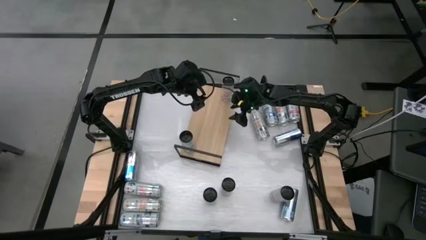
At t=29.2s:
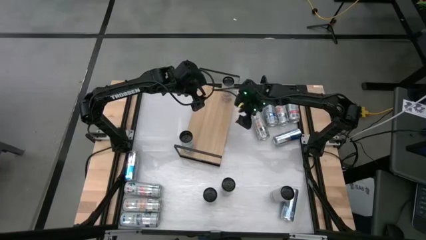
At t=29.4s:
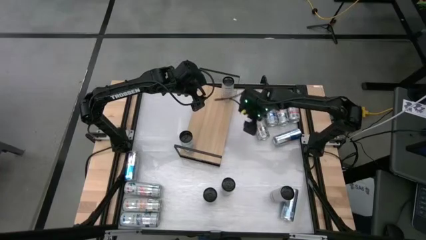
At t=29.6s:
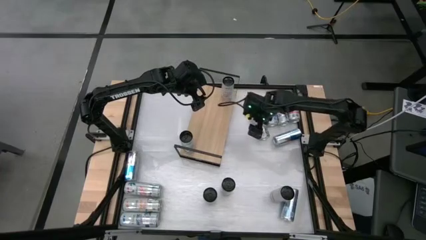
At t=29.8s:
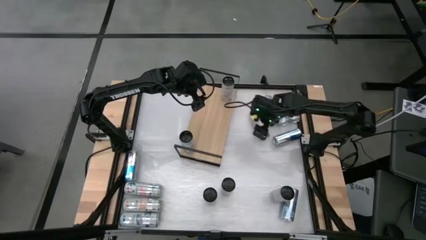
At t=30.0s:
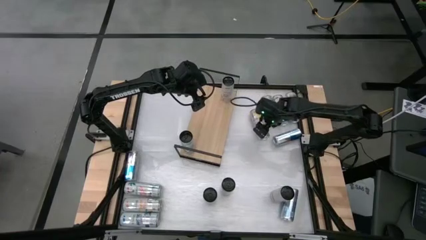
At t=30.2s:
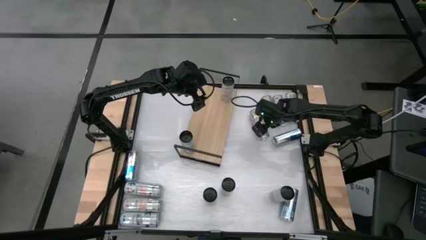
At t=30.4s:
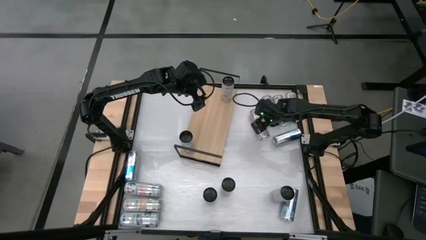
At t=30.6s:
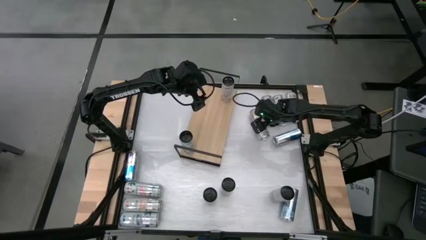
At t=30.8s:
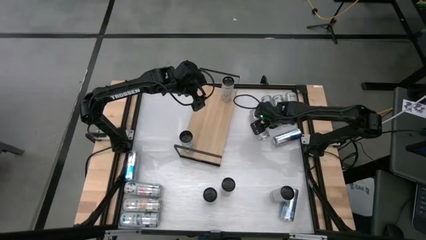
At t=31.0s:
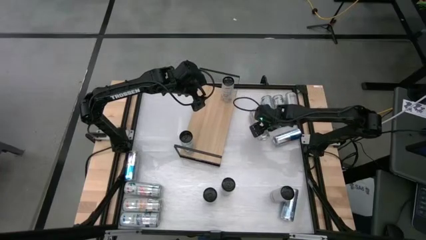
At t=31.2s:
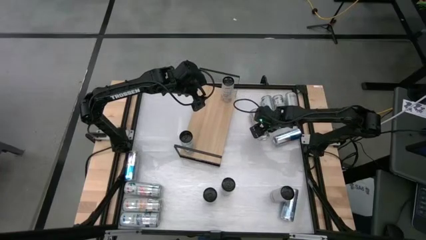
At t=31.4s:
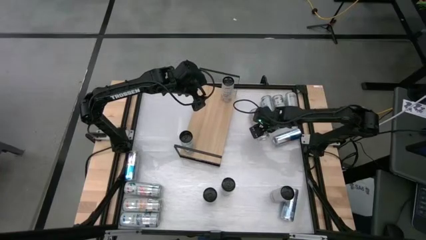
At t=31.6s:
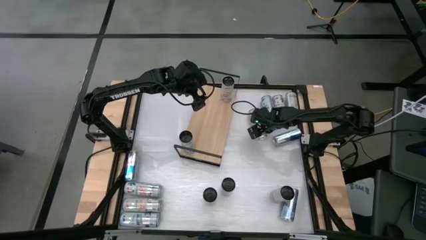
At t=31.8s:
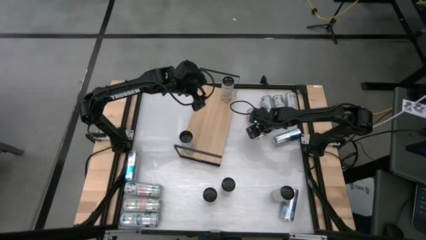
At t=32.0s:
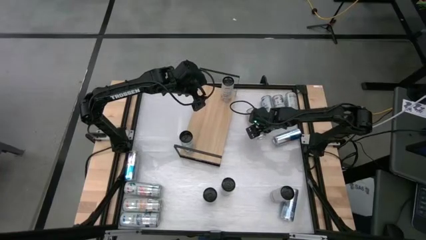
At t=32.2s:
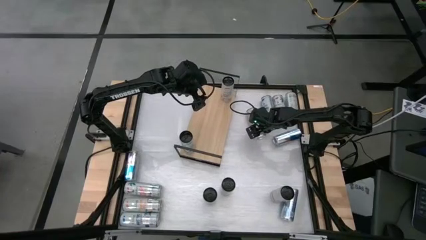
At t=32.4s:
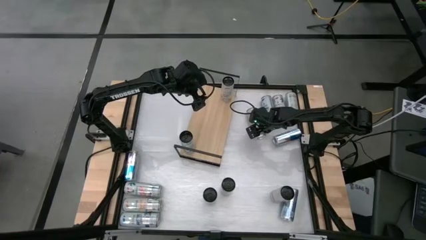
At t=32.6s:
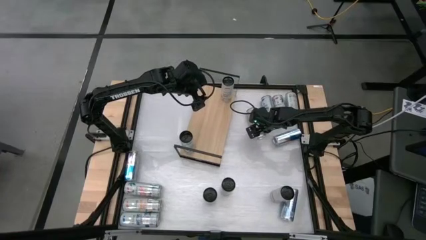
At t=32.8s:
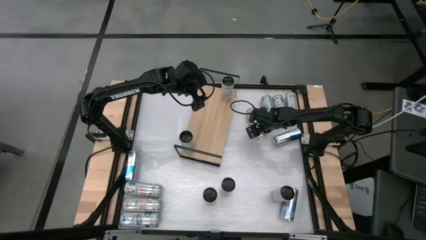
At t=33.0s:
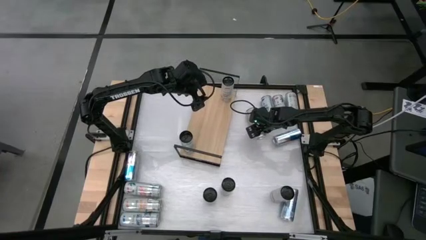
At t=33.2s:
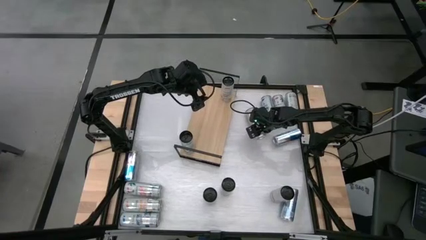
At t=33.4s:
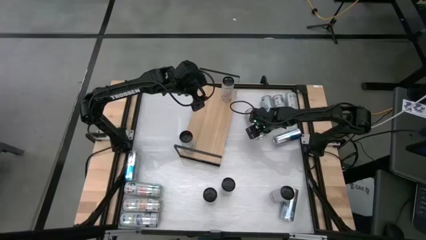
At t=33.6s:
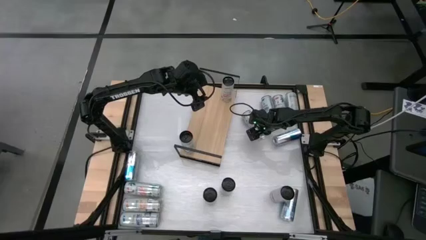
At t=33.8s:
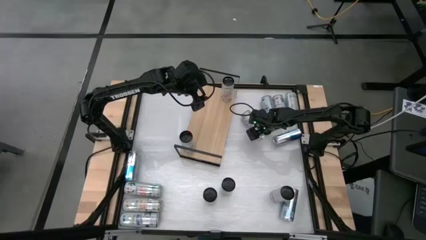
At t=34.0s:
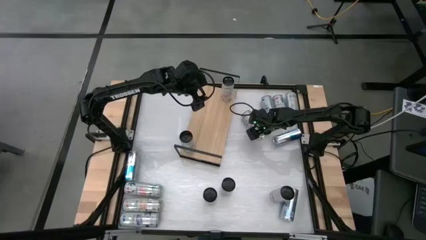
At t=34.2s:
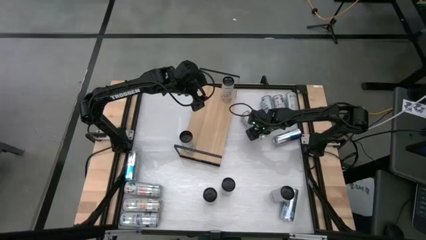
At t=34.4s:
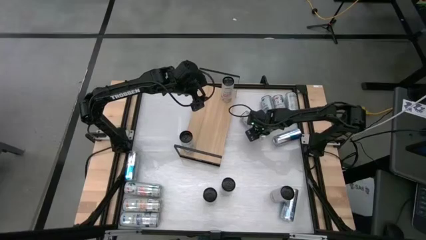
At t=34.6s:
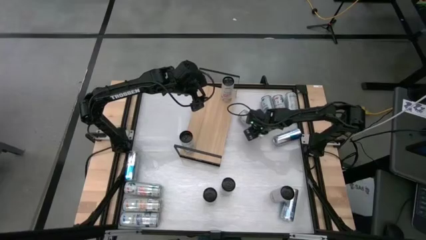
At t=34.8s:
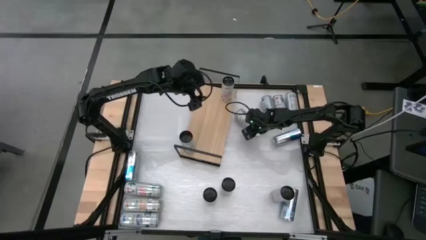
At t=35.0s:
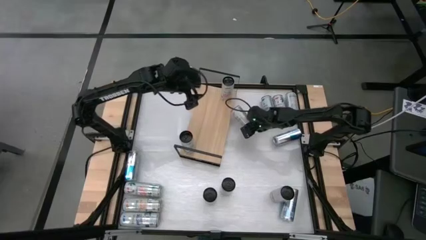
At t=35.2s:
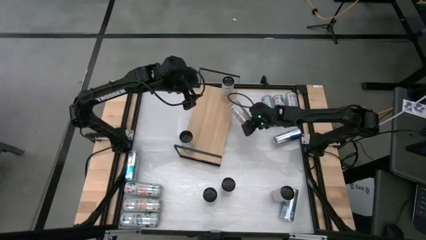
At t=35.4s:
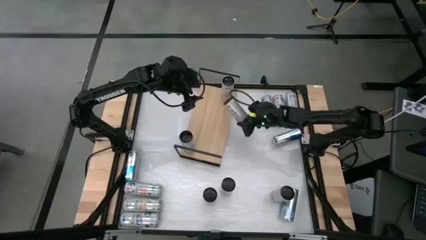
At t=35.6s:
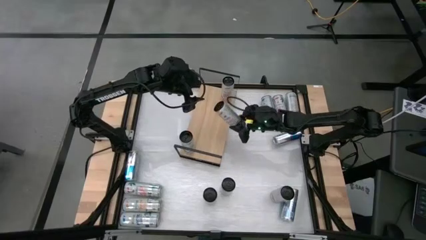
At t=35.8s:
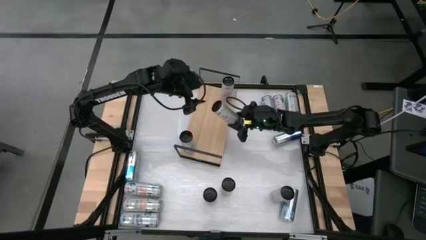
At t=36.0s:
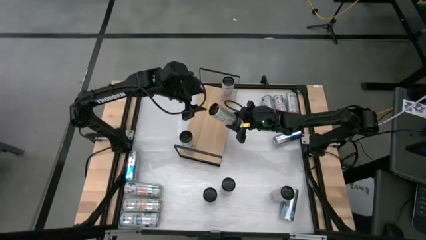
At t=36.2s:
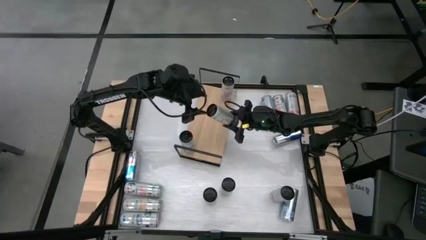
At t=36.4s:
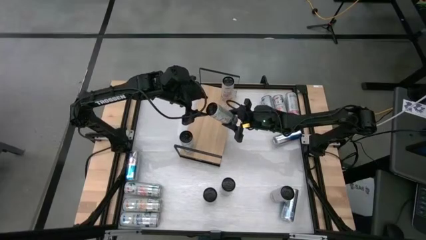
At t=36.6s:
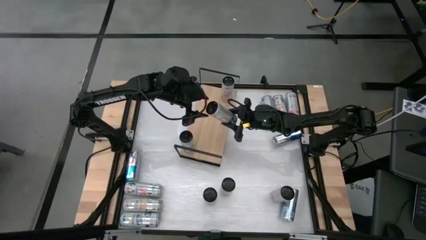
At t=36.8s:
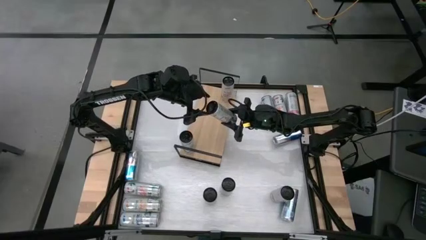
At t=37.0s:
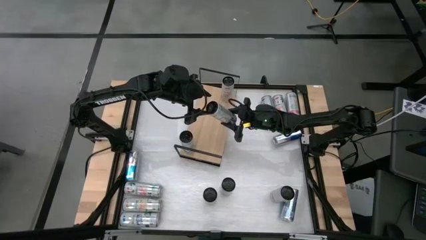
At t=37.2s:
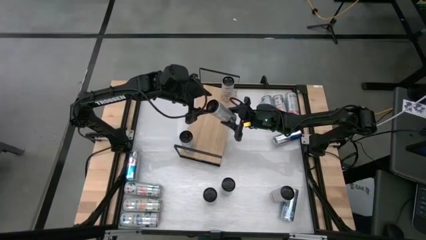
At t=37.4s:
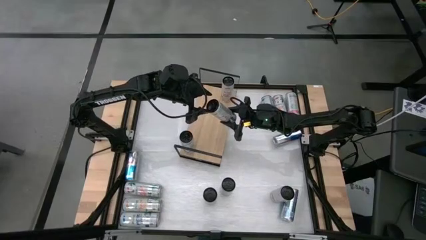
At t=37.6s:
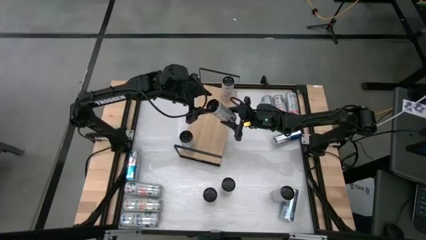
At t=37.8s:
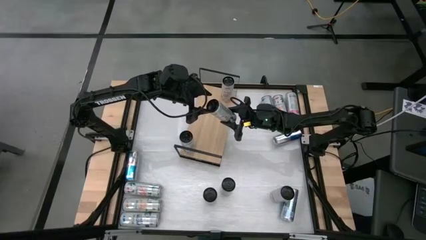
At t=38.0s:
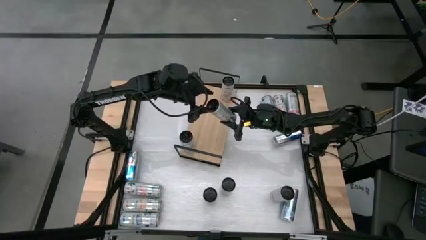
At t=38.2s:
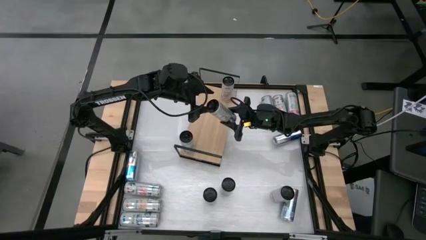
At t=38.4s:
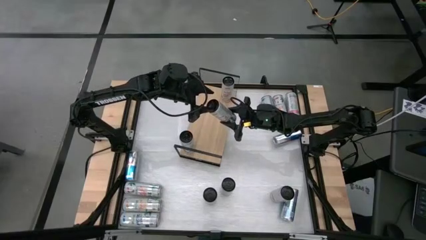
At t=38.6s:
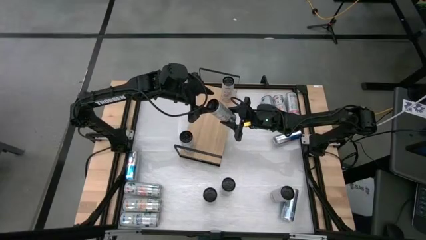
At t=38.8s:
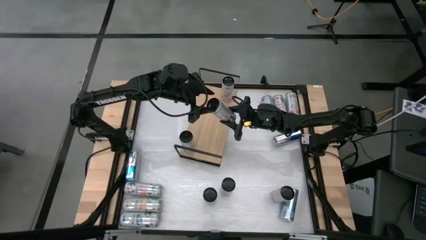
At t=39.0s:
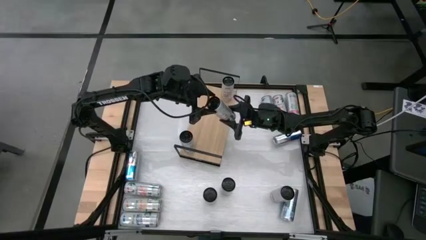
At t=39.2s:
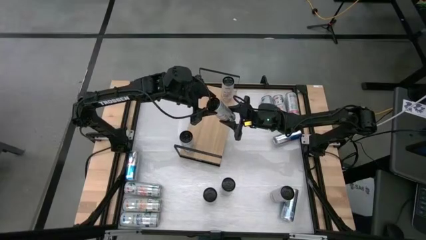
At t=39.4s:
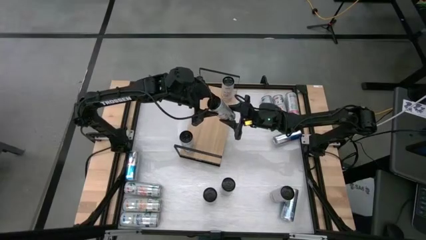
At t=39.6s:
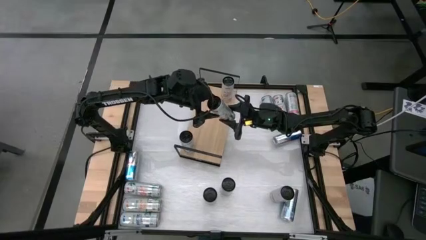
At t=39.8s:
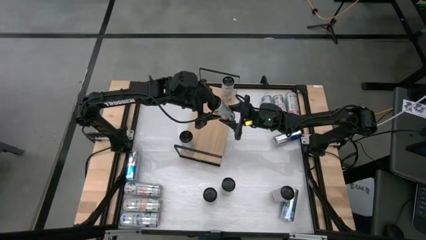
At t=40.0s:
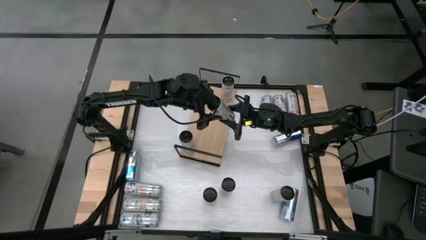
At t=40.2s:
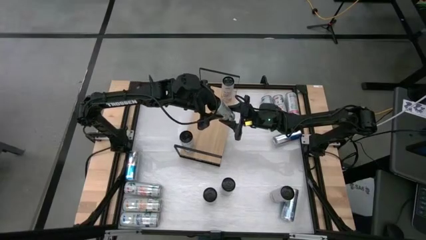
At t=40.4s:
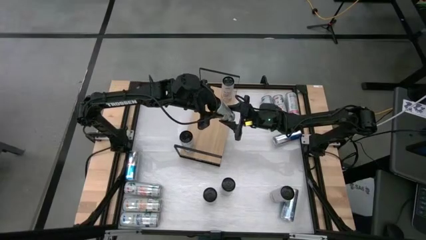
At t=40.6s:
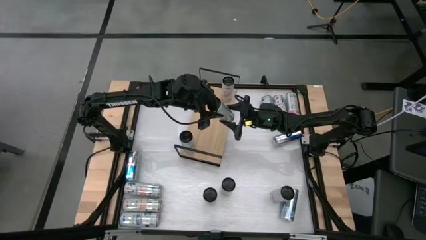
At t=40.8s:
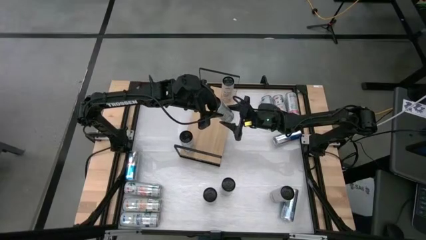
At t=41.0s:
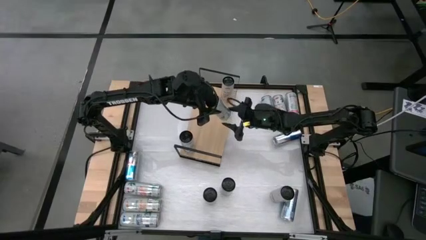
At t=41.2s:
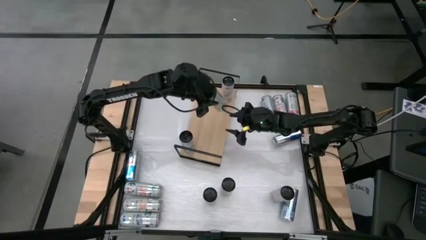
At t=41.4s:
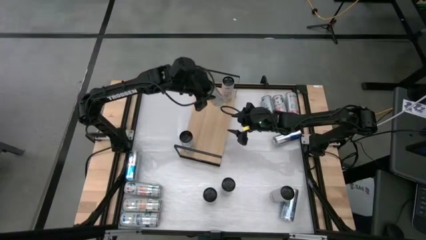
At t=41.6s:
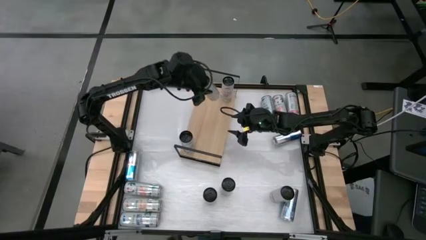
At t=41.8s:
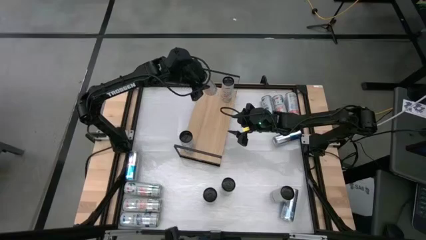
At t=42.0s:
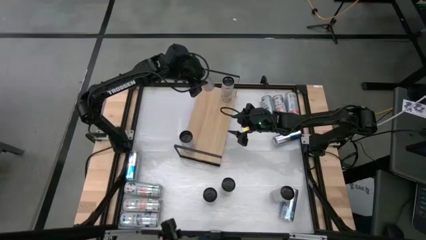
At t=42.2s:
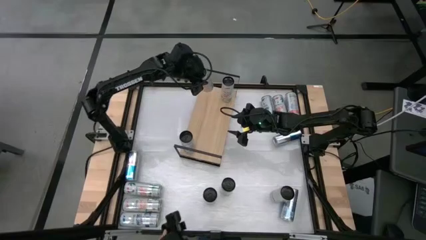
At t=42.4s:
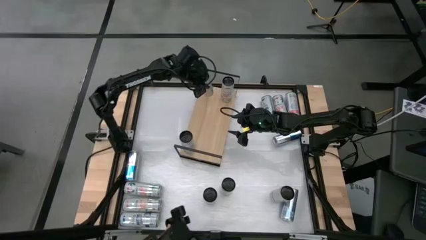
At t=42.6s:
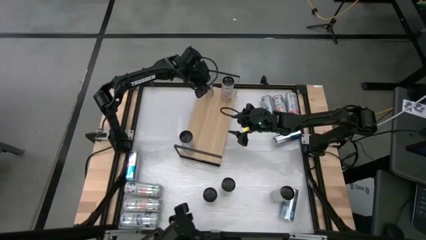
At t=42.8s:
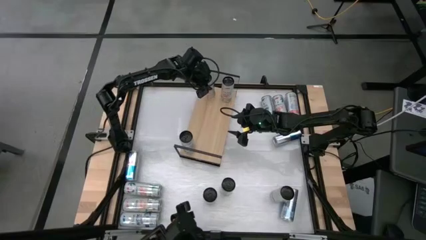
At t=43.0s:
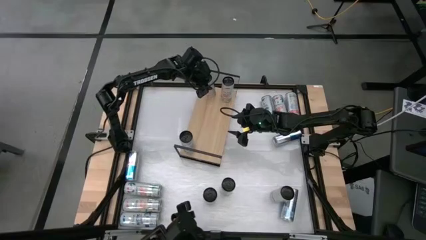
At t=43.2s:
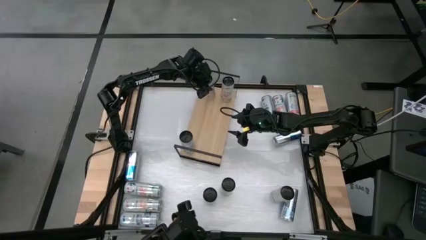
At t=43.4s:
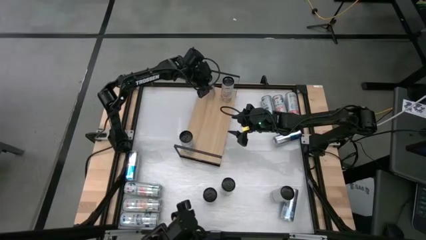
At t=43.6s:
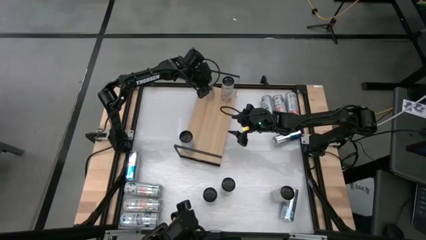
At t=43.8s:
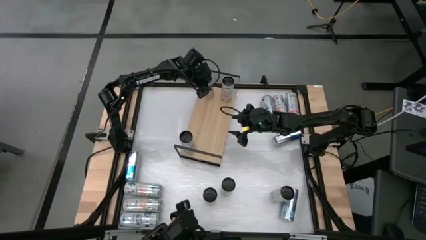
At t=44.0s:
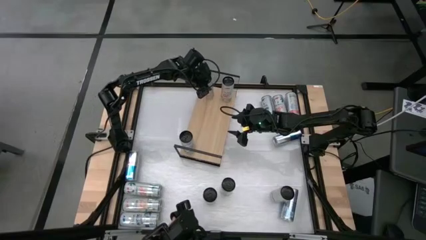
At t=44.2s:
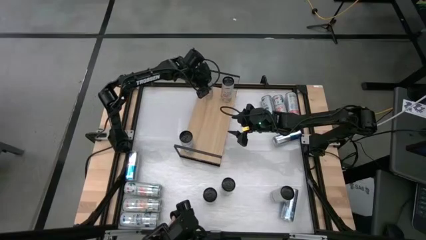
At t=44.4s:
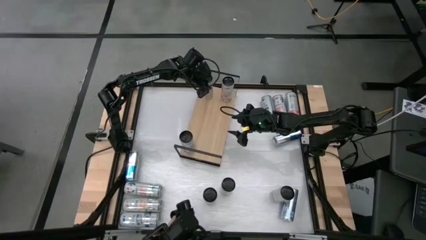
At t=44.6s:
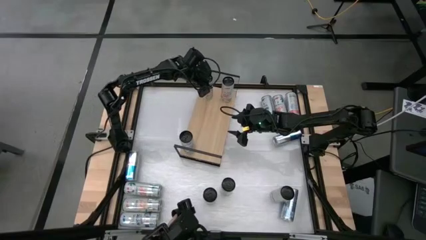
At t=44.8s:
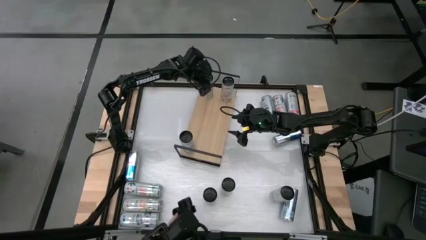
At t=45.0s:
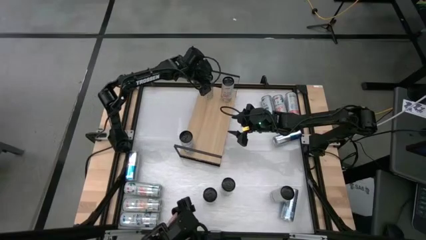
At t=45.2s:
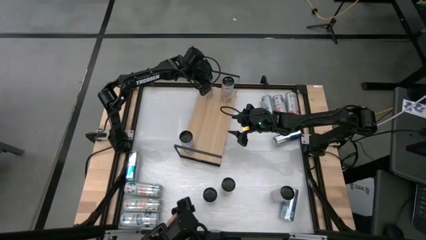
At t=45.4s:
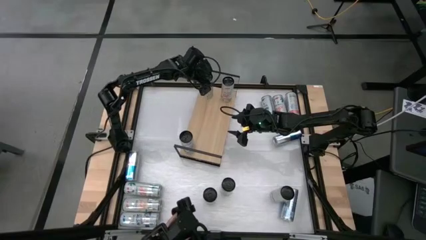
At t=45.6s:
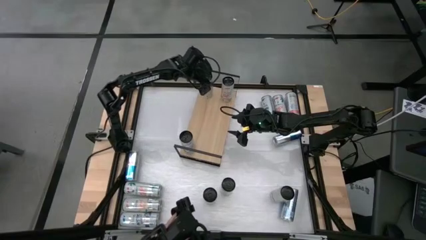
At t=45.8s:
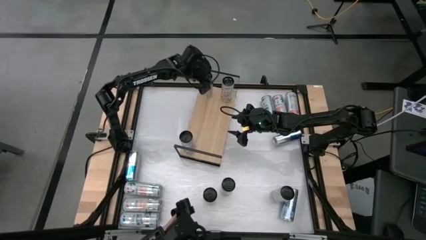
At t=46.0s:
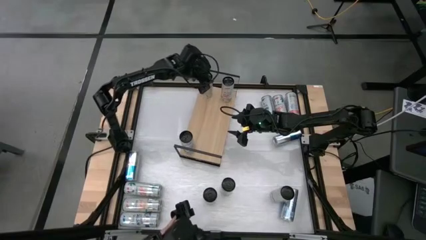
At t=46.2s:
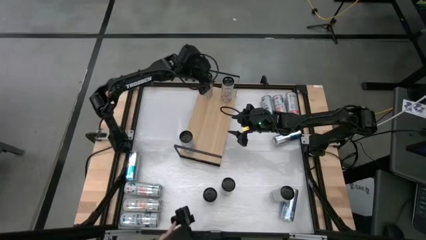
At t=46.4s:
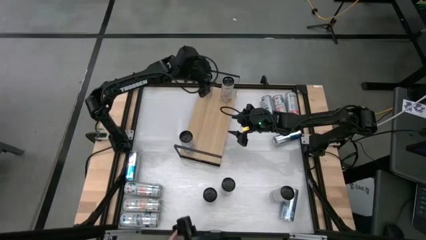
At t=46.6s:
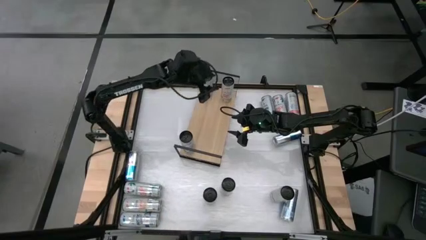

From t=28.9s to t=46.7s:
Task: Place canned beverage on shelf
Put the top right orange soda can on the shelf
